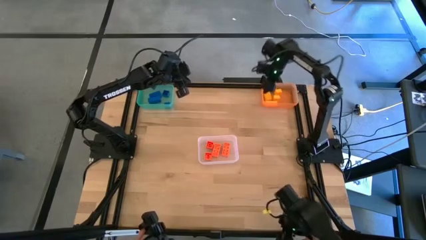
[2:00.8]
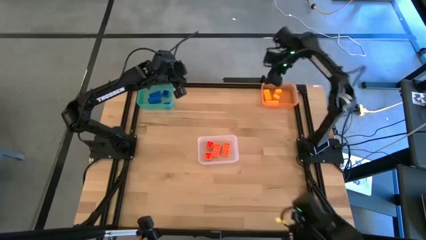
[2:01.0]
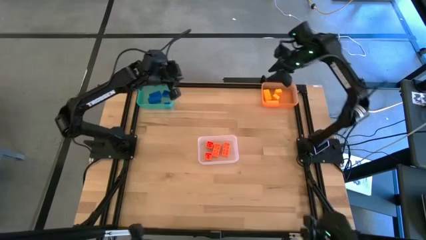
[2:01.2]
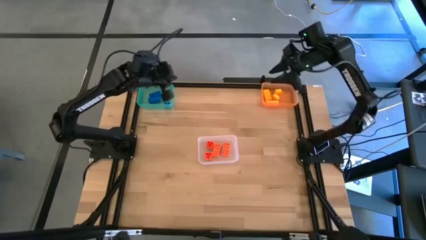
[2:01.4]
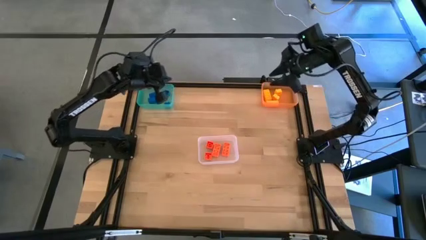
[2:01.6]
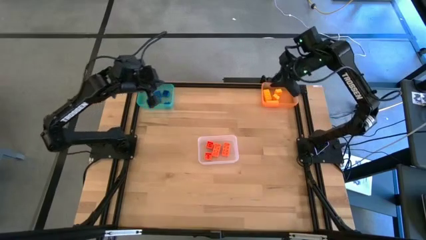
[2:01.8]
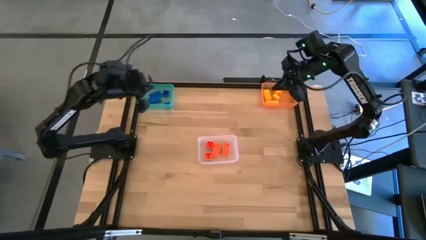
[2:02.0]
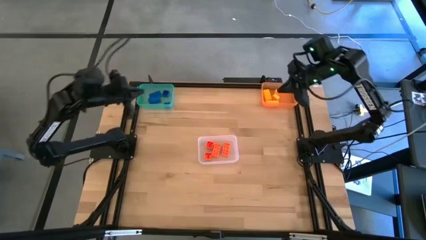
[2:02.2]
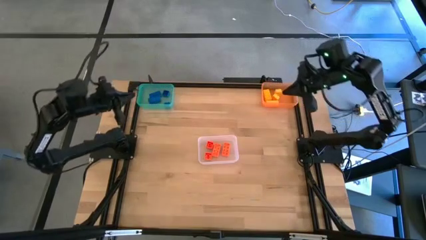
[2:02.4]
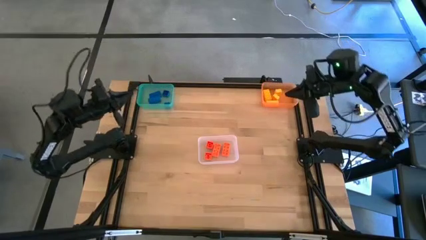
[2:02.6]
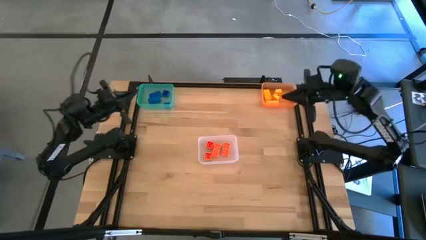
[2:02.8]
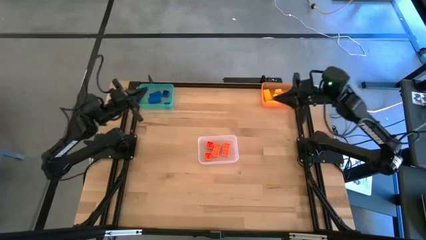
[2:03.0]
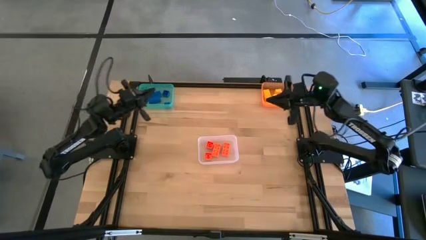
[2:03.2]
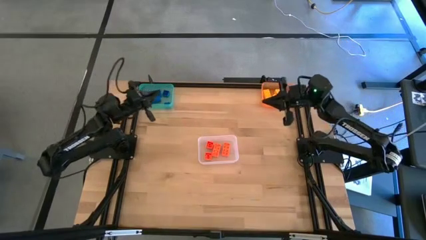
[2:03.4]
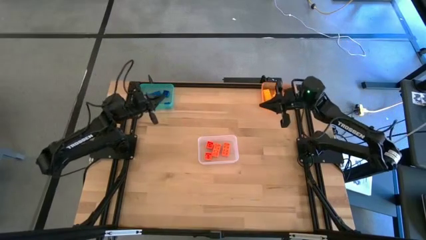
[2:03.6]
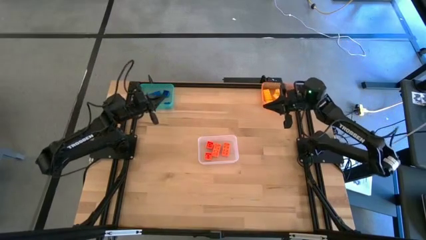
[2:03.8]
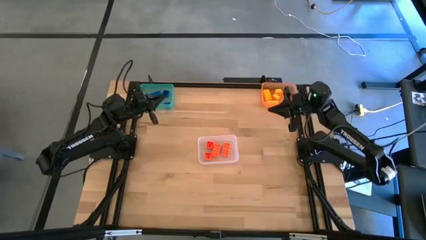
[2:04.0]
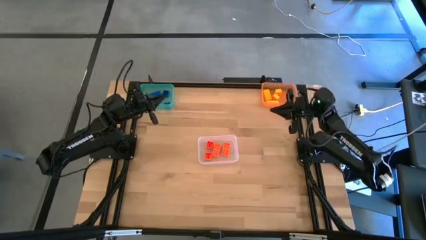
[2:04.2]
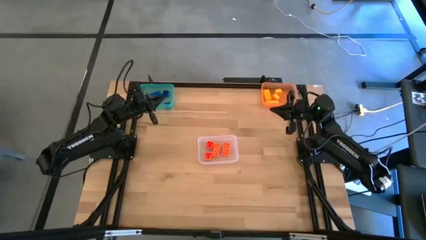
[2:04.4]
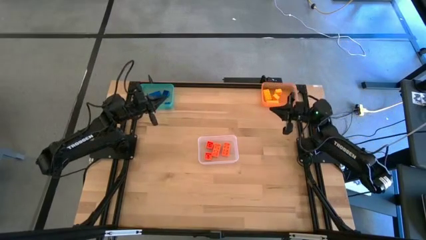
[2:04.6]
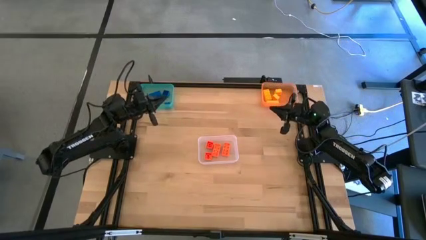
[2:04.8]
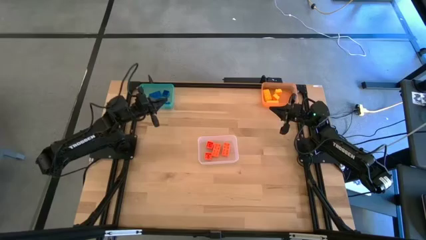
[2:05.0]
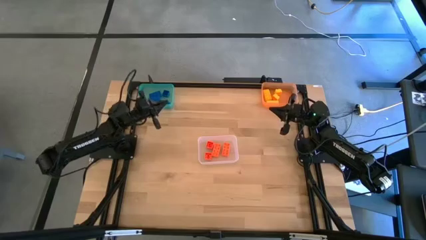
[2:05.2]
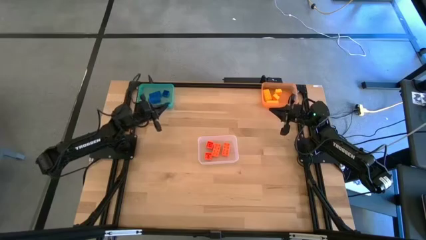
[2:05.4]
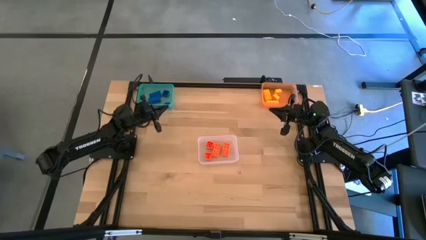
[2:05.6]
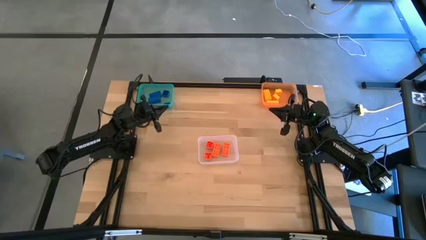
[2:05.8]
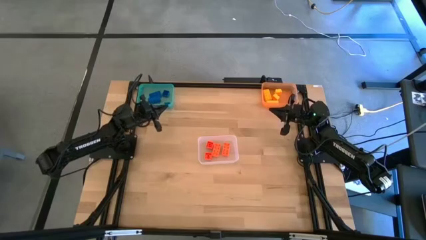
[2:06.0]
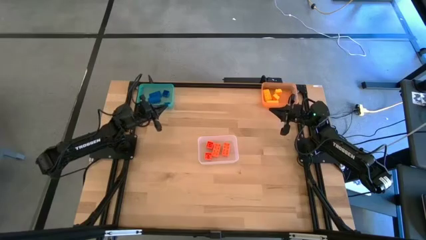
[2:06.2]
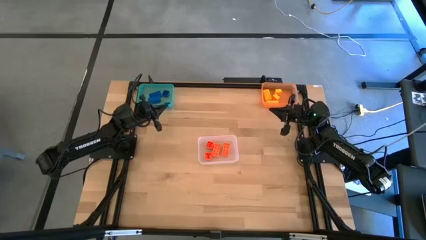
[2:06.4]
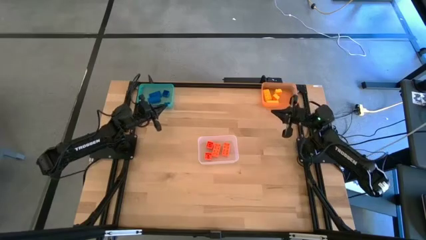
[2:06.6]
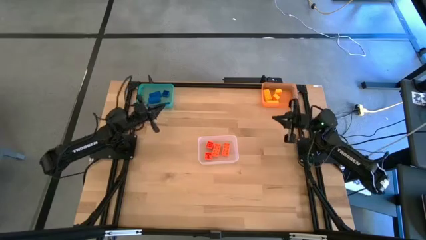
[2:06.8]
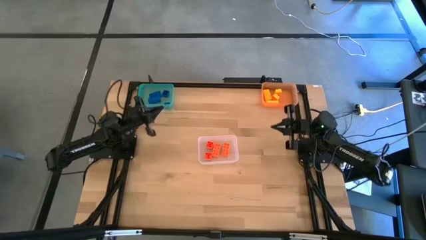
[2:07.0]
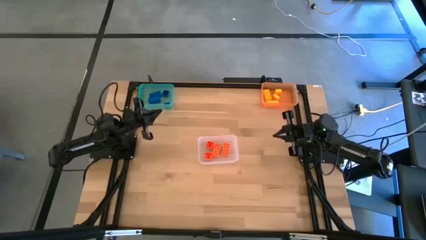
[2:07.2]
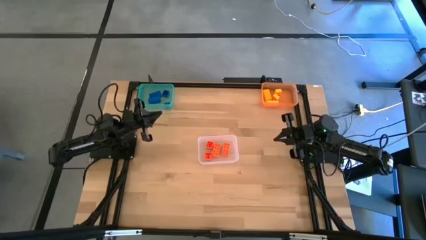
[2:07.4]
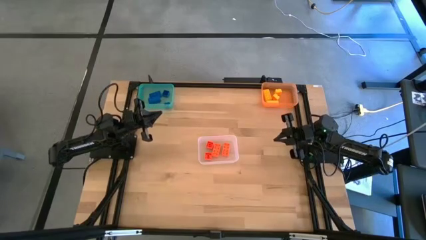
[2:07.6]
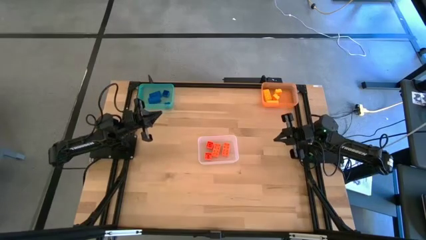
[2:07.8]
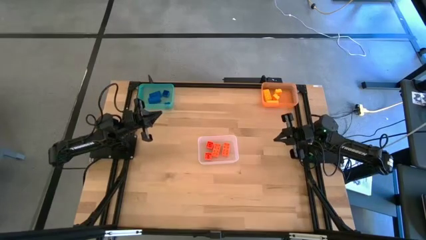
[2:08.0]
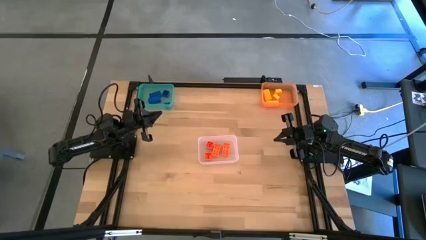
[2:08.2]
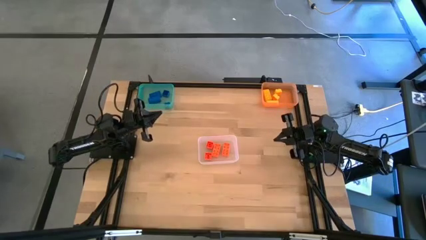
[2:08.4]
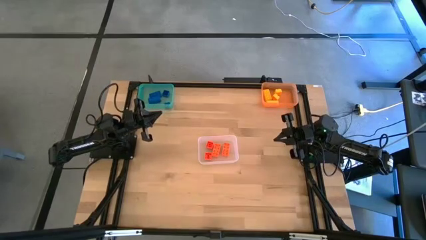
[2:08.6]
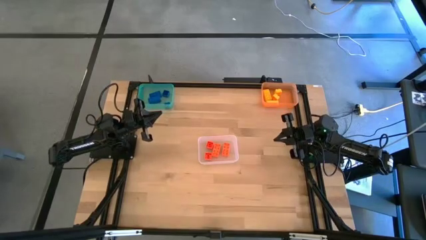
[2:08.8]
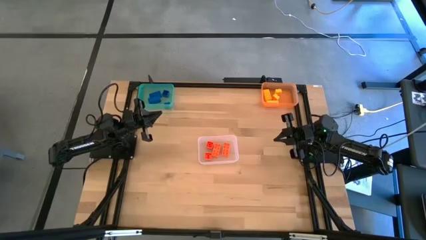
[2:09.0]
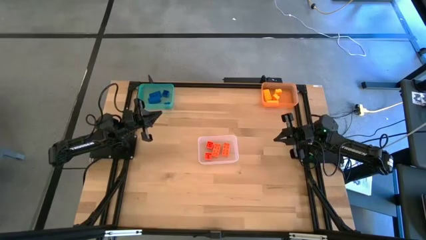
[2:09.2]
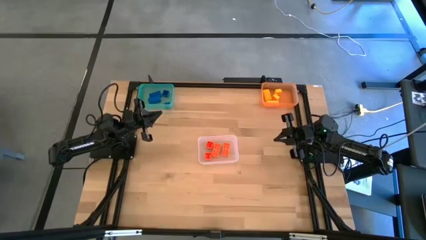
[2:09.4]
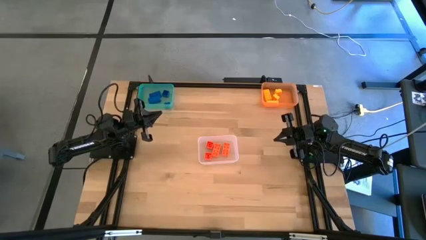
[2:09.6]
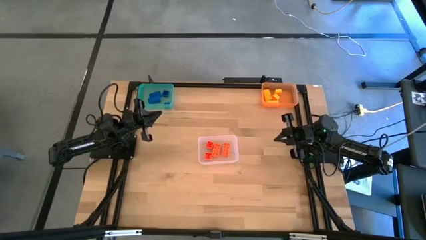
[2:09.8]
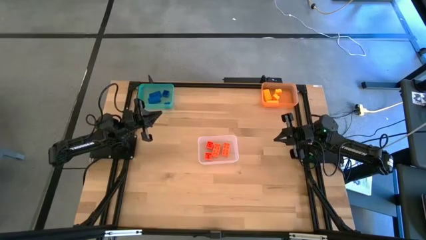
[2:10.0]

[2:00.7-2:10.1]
Task: Sort & place blocks by color
Return to Home Position

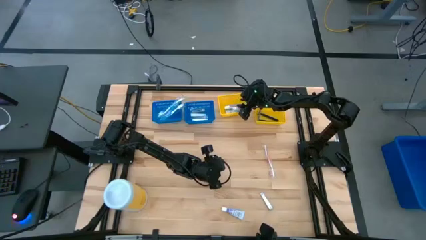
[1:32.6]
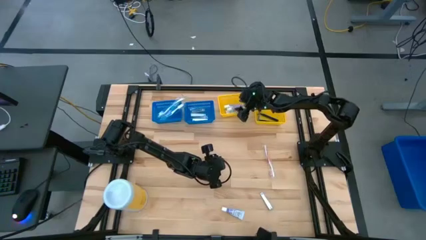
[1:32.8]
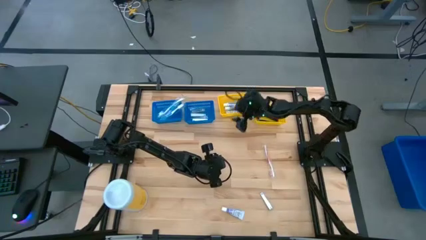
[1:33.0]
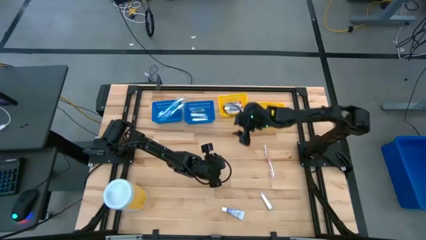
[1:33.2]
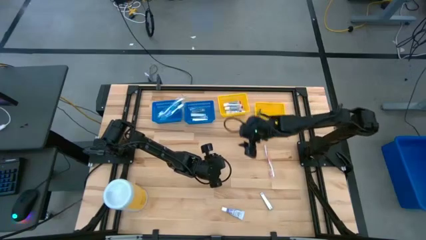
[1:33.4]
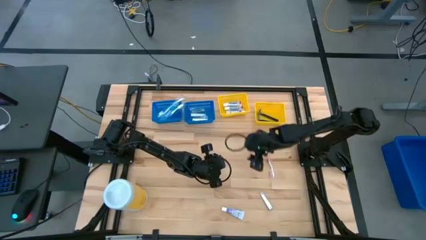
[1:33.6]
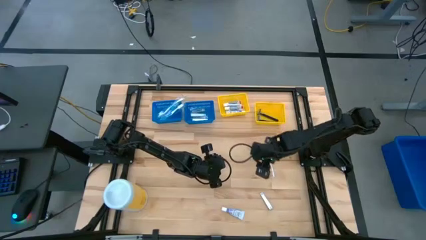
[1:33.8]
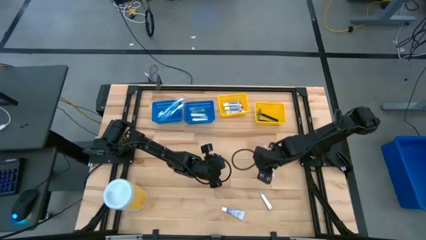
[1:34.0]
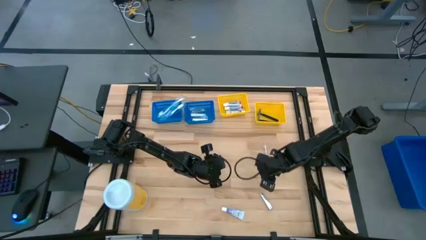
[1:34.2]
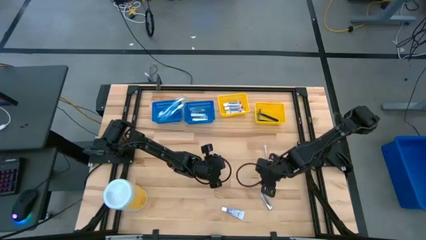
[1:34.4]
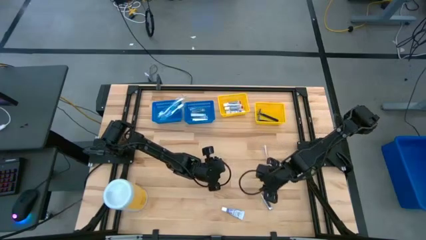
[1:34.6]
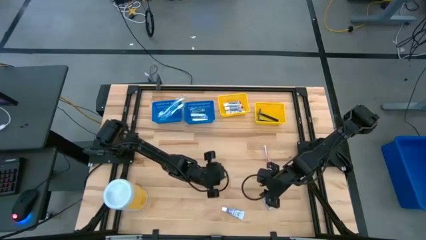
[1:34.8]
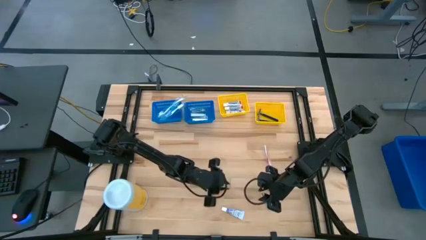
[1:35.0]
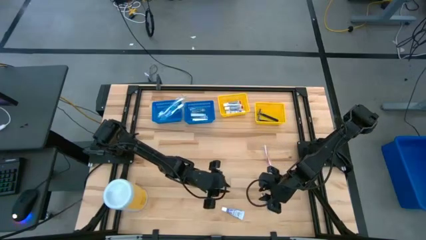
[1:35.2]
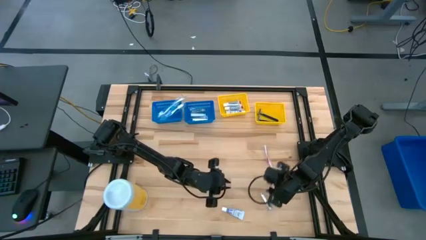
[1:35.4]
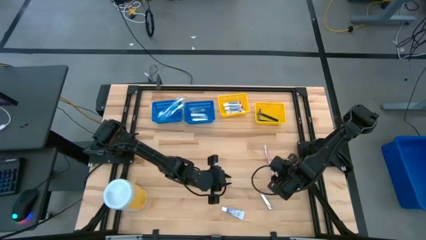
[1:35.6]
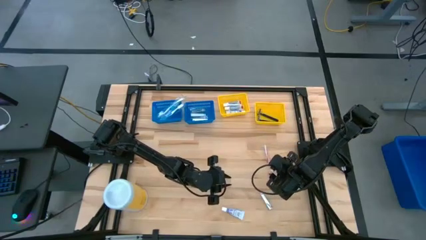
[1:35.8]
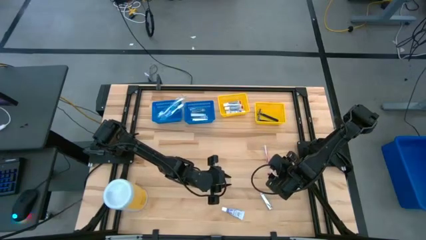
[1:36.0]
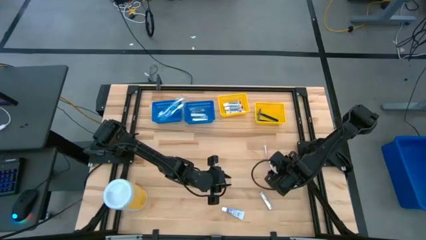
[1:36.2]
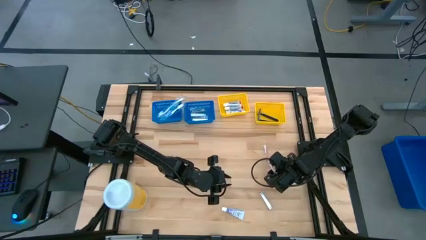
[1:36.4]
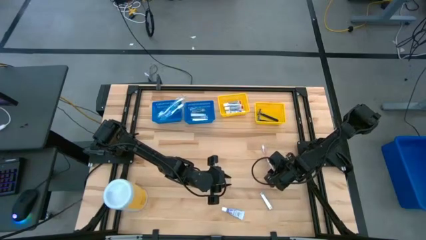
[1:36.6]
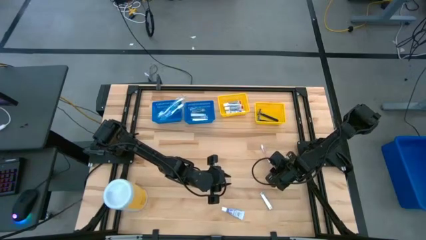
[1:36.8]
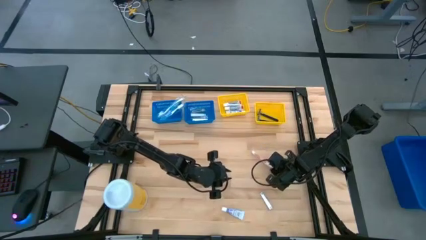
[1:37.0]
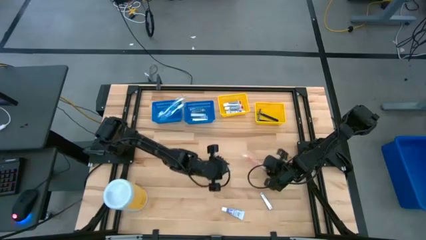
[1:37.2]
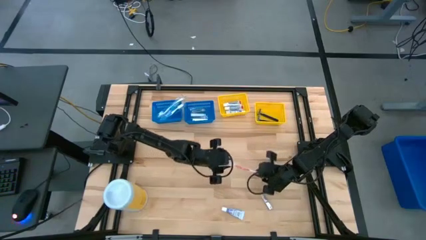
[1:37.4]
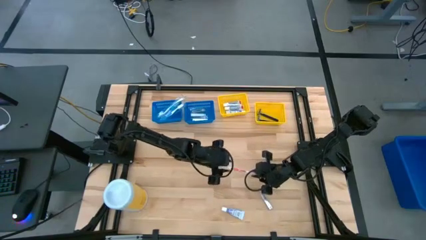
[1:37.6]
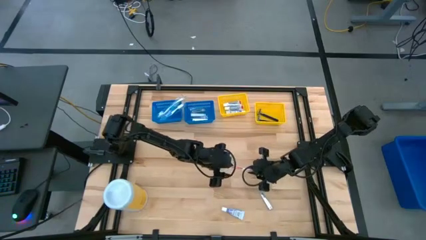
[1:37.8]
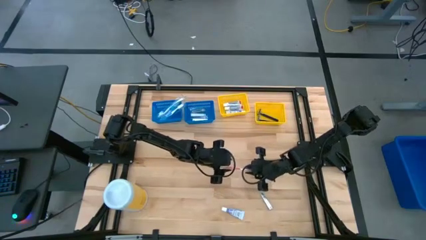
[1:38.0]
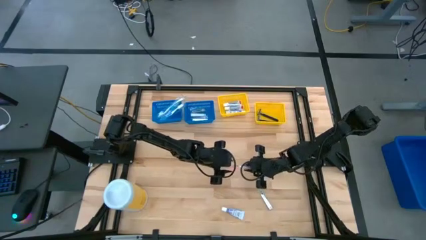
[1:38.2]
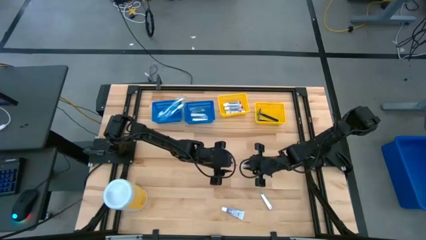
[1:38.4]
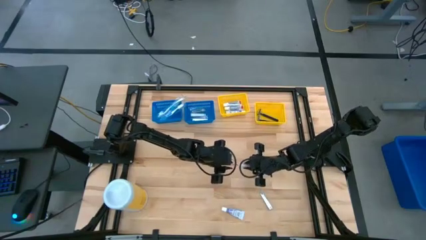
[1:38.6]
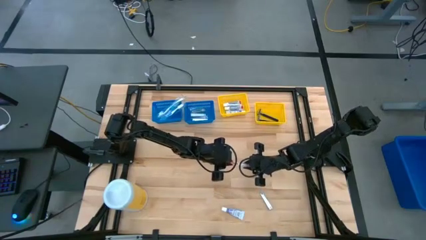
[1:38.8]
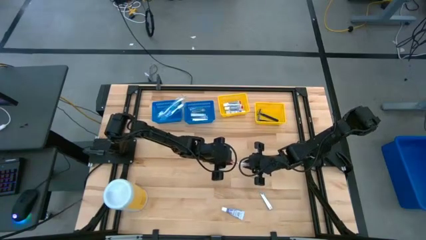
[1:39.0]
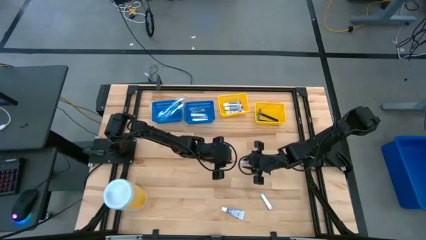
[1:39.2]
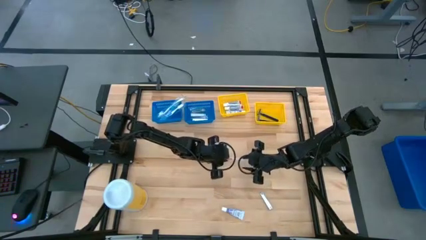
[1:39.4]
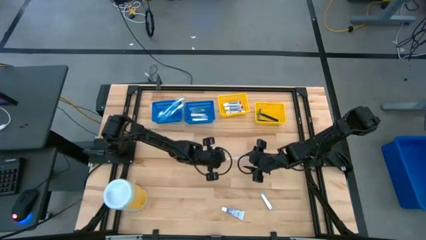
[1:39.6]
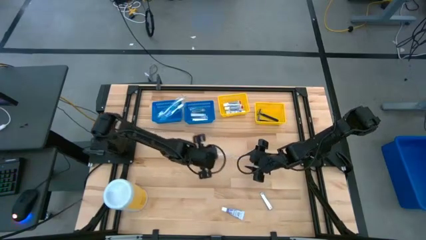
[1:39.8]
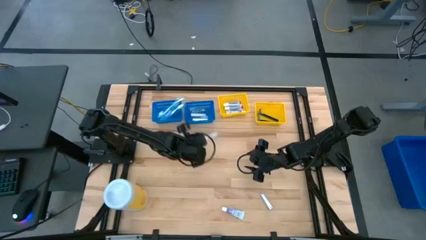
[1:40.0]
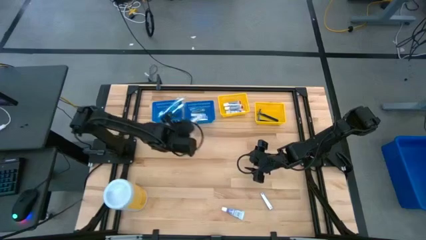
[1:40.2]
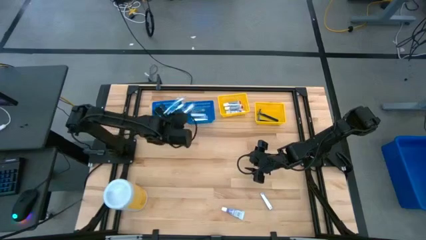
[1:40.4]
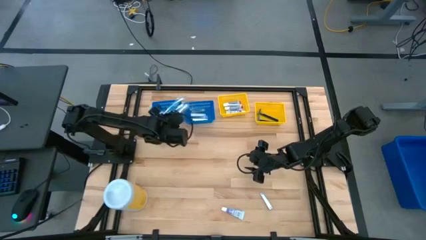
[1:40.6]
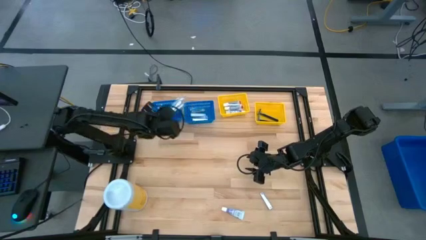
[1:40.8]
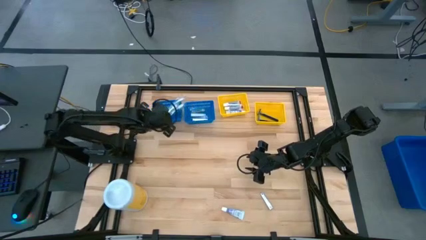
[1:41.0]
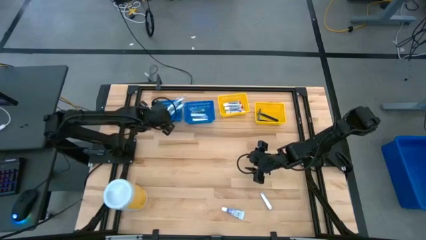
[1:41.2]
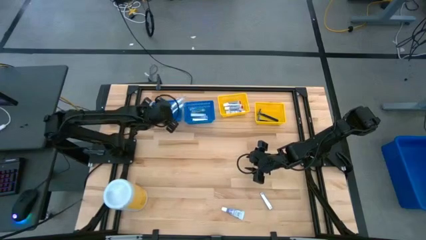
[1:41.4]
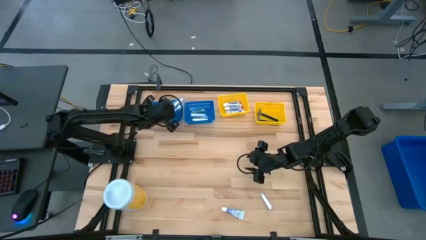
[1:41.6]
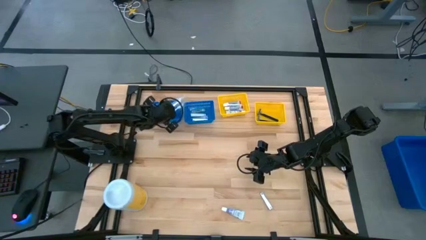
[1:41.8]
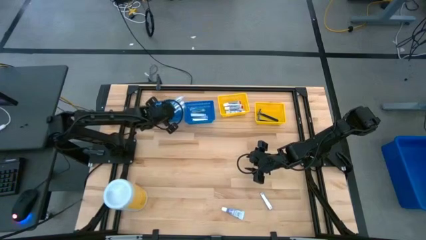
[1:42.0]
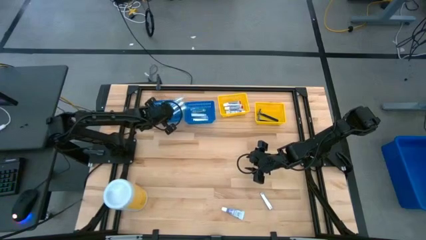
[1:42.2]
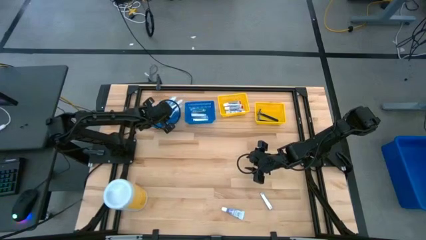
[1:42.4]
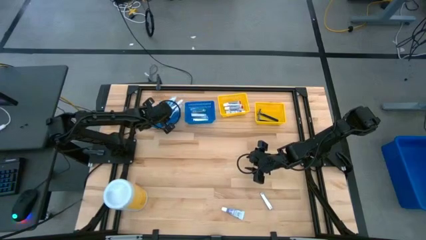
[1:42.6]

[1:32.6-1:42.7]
Task: Pick & Place Travel size toiletries
Put the red toothbrush into the left blue bin
